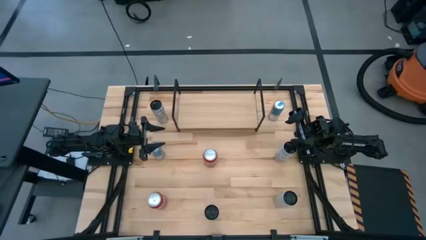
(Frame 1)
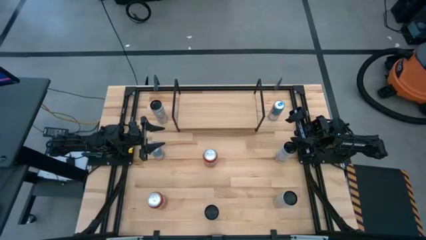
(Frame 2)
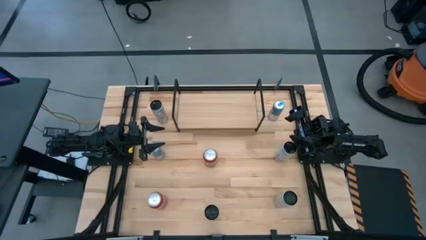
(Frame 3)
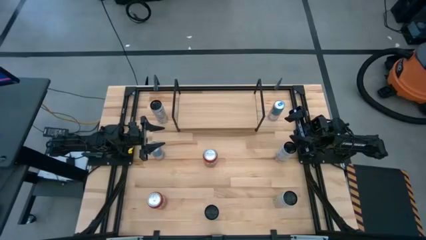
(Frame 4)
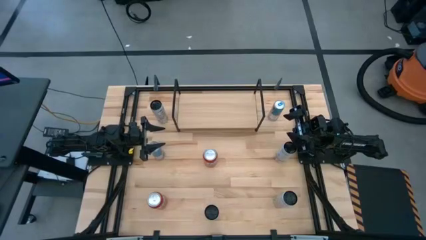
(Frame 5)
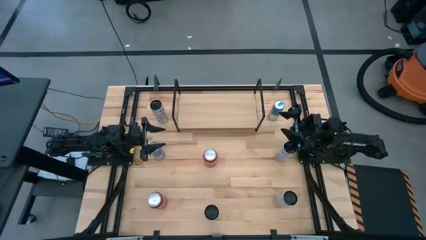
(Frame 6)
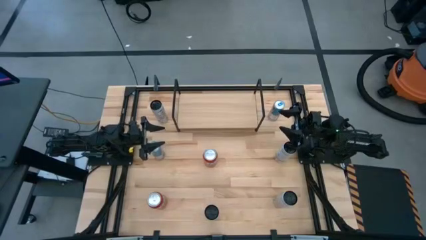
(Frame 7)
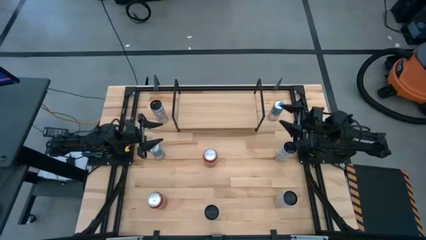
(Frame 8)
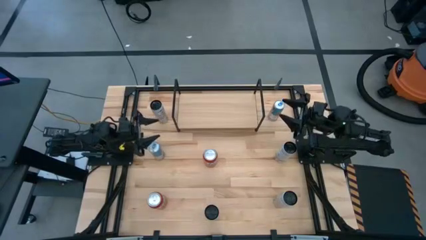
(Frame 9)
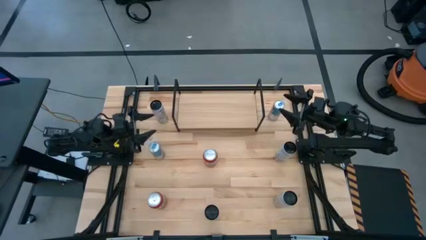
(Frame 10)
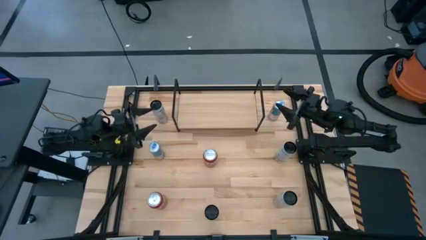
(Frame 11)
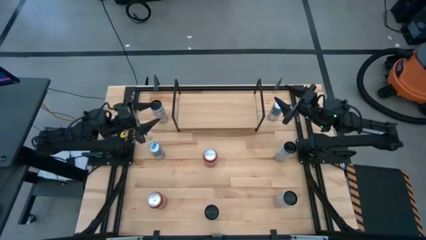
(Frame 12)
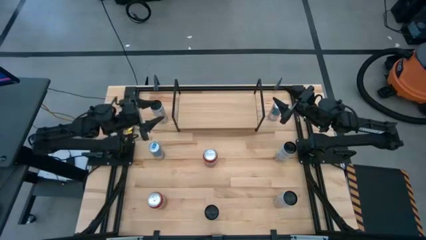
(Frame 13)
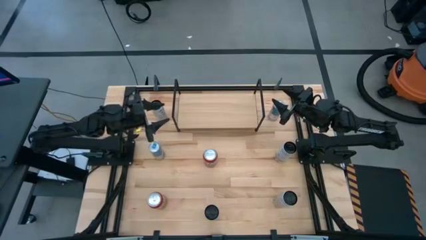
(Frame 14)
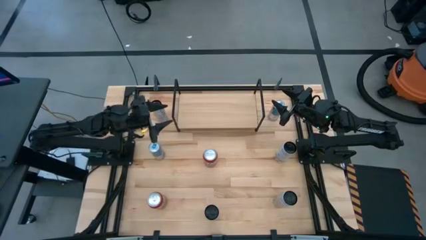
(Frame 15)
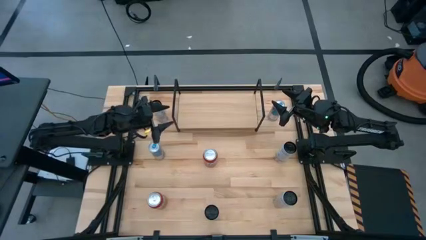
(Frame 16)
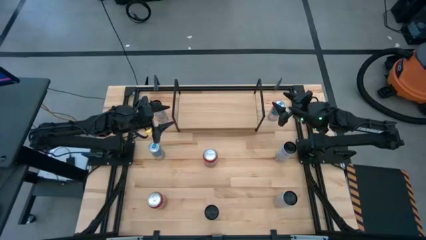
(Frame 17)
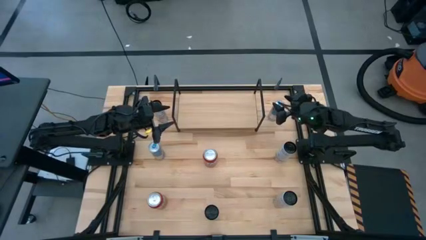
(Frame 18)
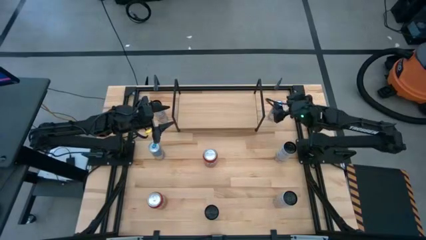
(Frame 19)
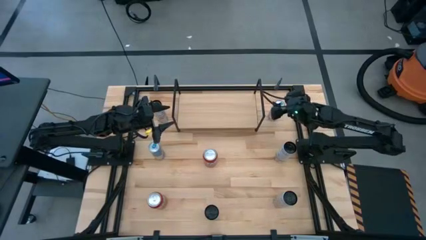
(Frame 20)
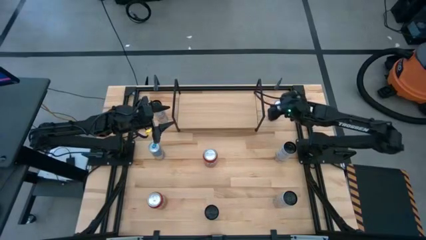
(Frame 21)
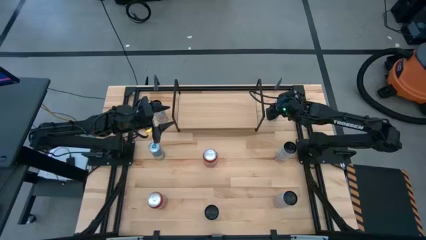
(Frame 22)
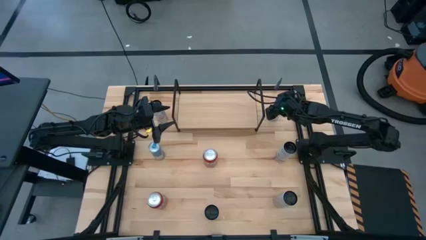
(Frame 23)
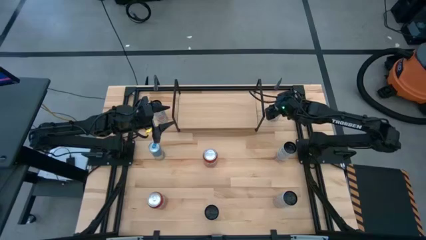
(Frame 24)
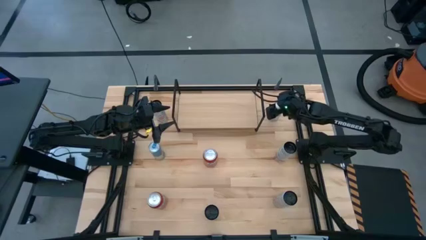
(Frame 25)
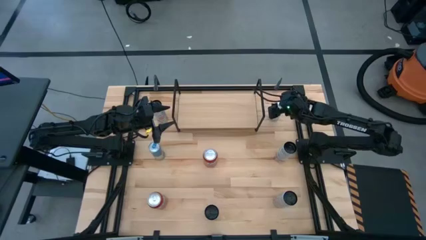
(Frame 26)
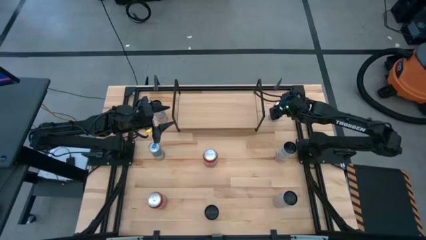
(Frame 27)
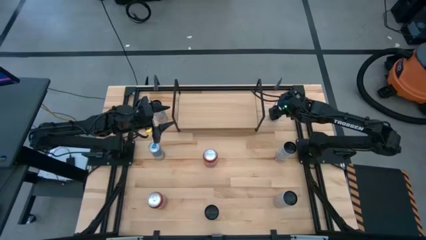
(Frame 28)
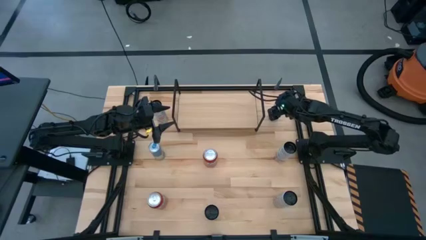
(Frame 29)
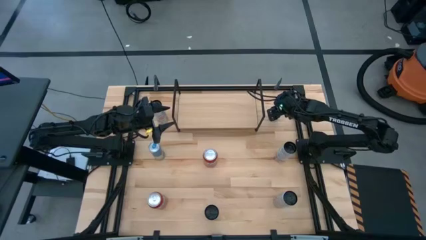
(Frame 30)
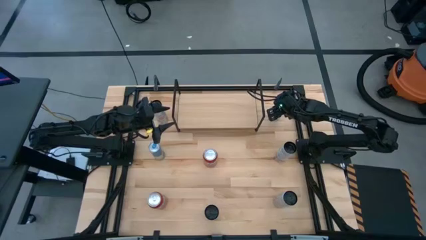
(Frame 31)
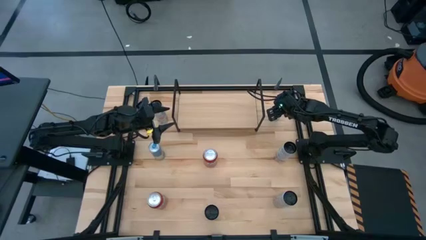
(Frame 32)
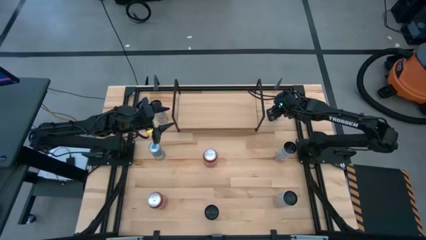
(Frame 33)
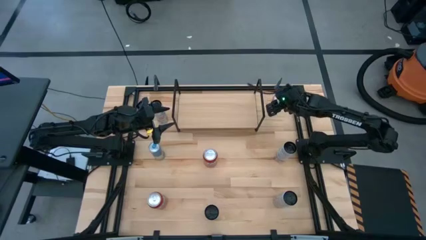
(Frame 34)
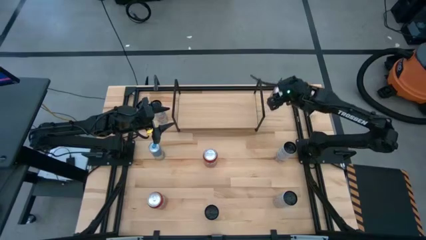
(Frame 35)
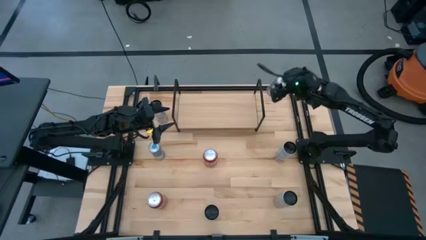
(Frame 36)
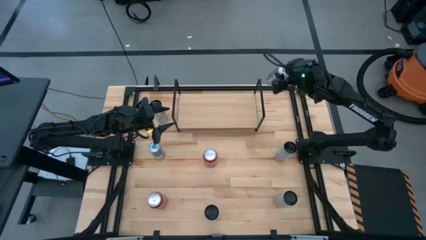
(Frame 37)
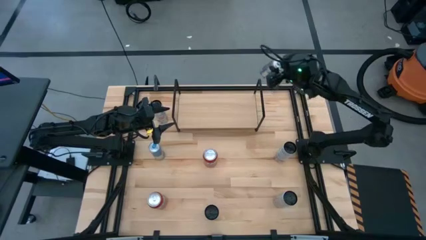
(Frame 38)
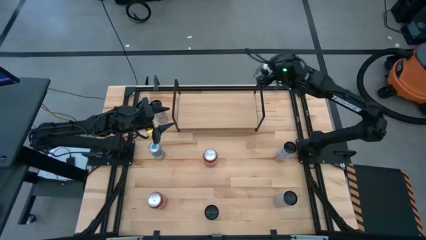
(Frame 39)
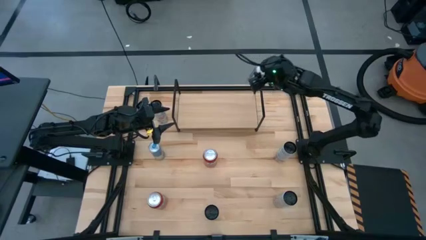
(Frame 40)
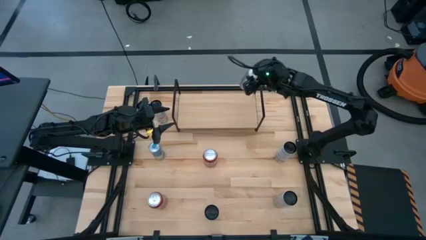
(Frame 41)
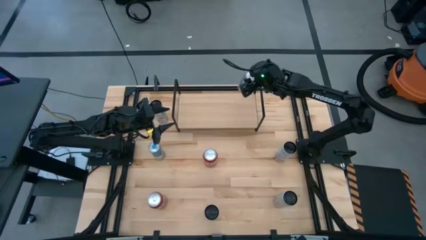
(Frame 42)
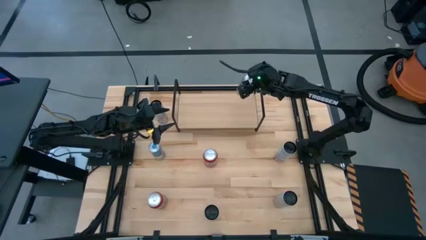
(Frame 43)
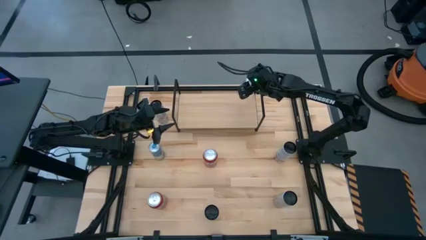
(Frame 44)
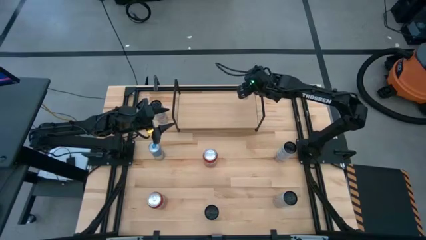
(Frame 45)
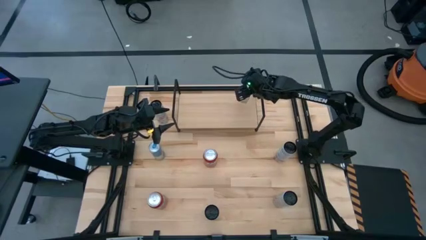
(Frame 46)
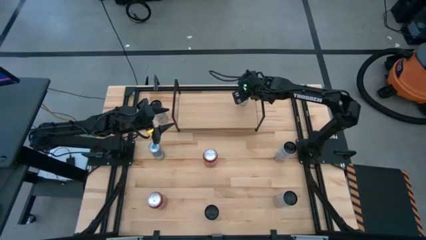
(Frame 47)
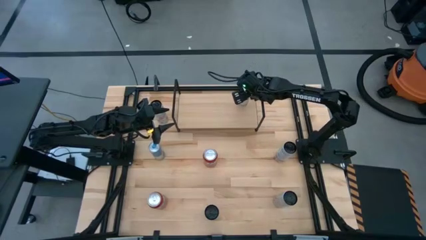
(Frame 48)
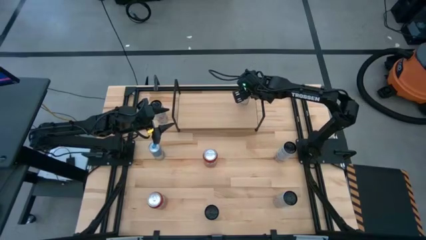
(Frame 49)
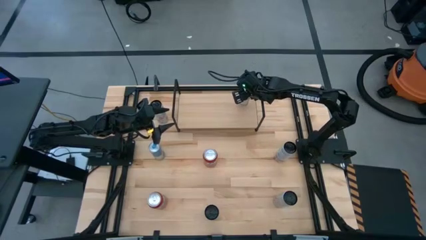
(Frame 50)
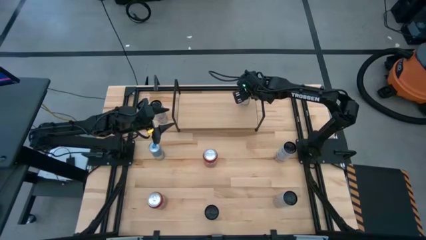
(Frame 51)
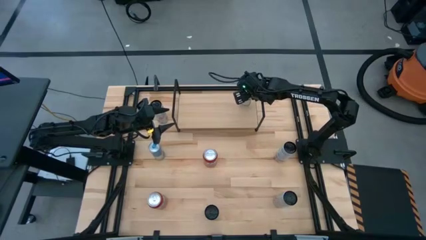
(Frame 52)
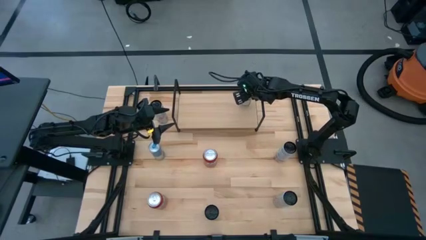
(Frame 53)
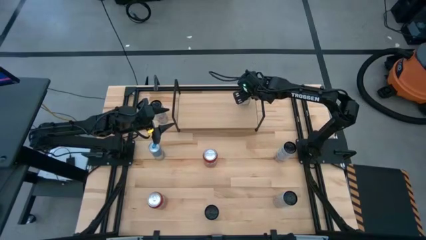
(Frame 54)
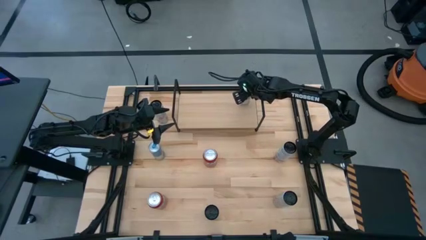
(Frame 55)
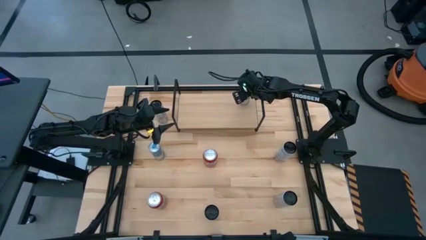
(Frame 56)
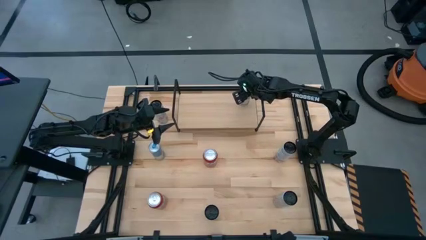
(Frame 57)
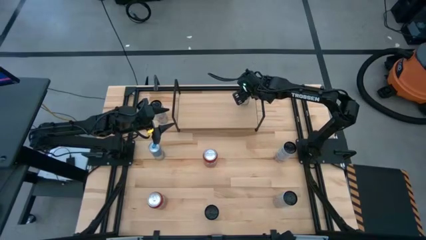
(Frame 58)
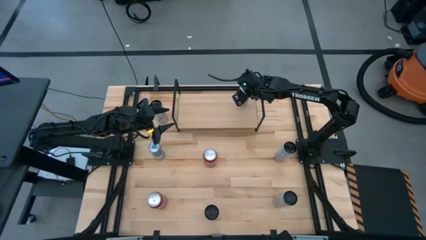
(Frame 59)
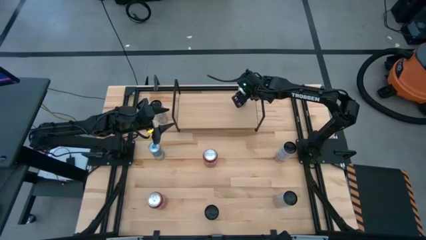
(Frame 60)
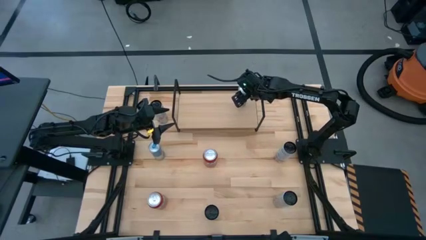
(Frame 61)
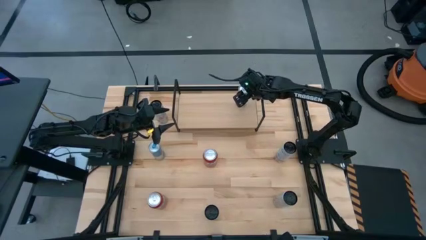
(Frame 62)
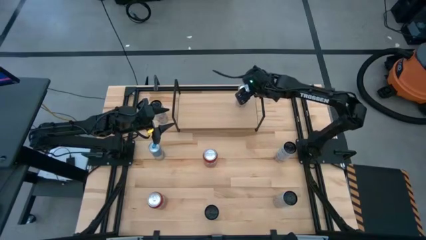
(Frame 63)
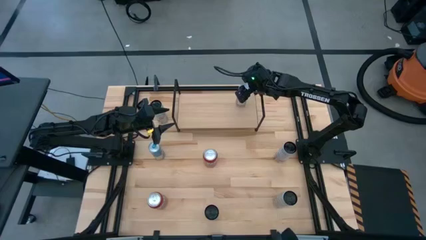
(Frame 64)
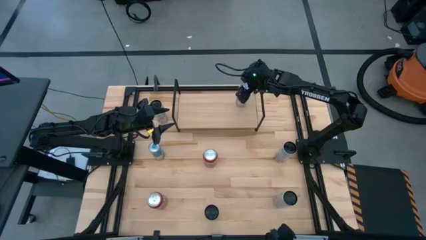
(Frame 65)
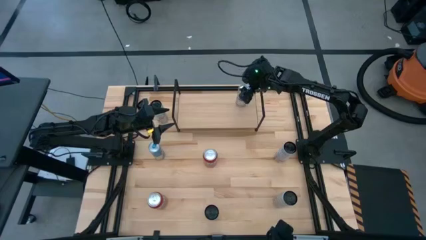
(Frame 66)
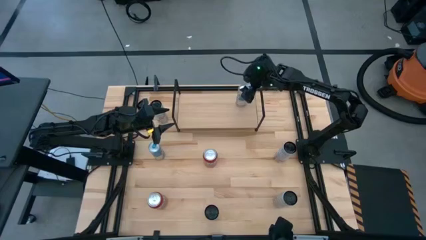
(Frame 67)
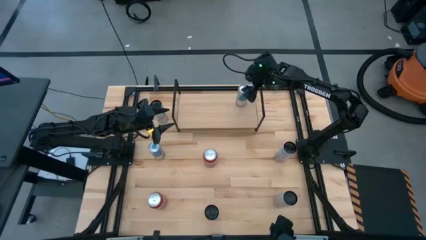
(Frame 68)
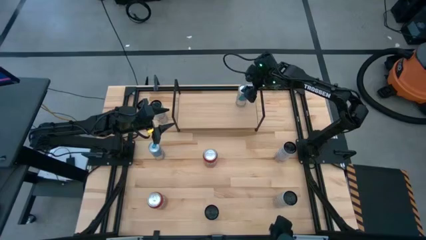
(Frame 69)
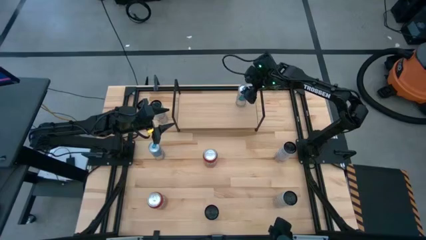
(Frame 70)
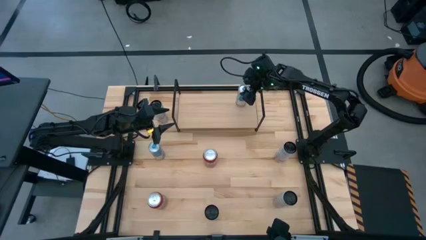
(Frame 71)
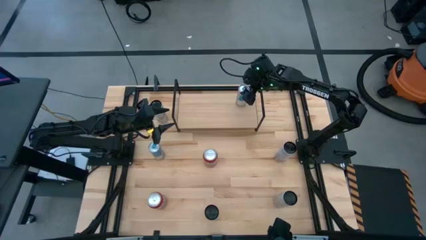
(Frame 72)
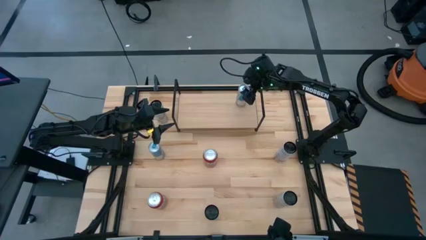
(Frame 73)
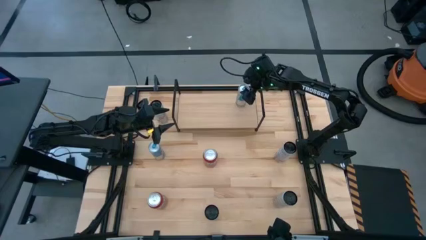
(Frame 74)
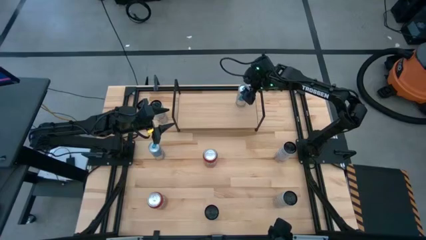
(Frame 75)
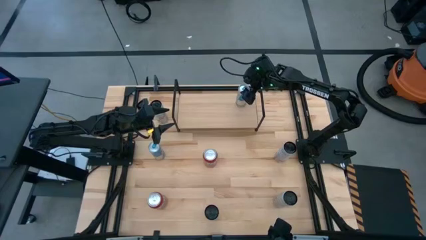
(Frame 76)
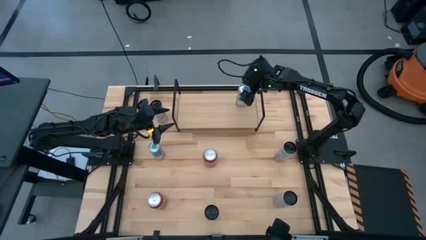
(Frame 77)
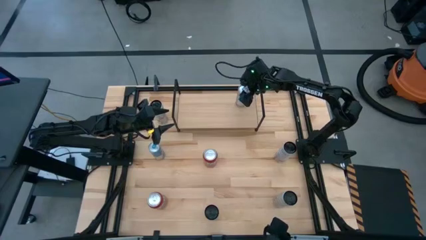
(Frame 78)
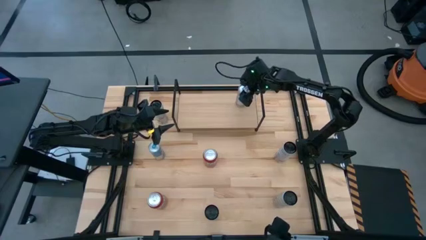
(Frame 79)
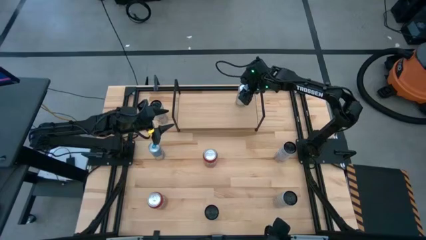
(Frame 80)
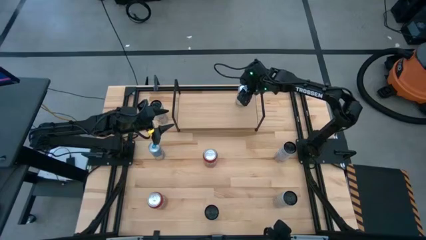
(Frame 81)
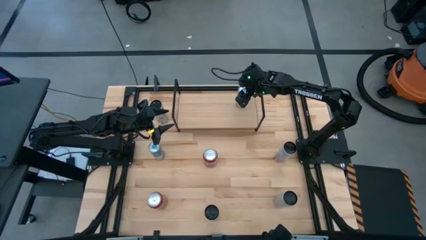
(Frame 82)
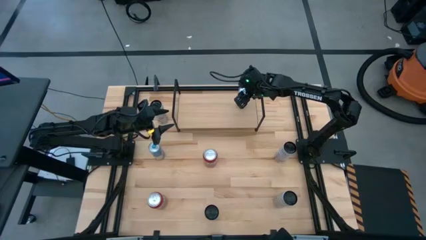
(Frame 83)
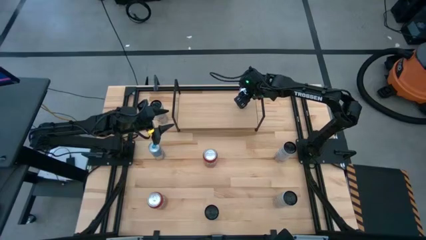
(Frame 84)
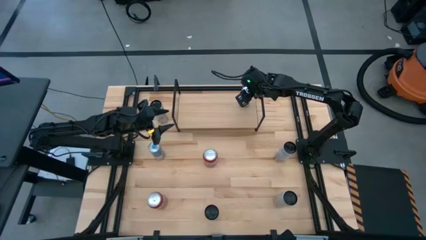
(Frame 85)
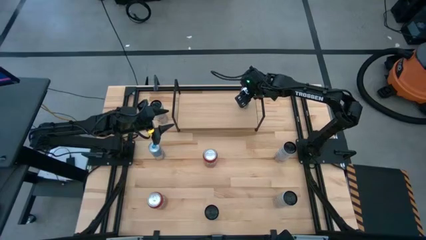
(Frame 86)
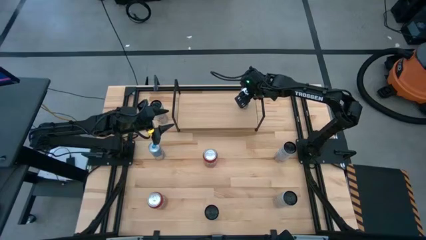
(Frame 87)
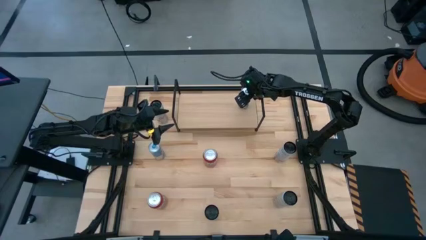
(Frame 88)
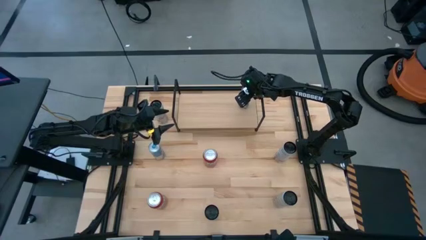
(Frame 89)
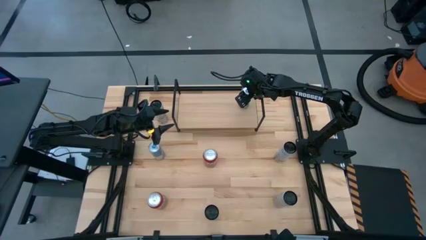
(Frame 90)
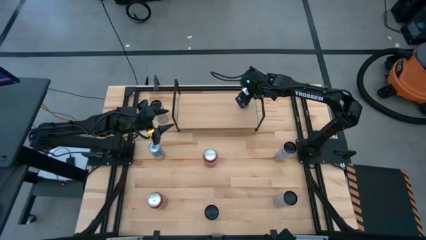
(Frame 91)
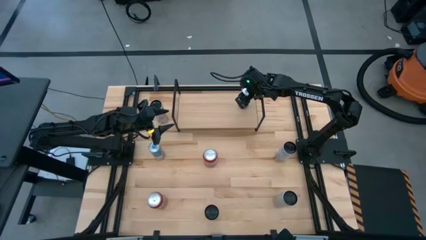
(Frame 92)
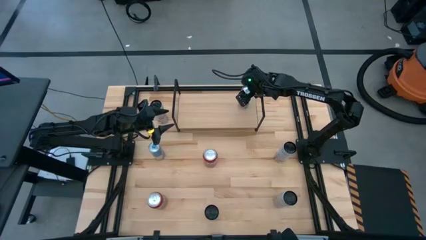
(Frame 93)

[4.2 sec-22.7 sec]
Task: Place canned beverage on shelf
Put the right blue soda can on the shelf
